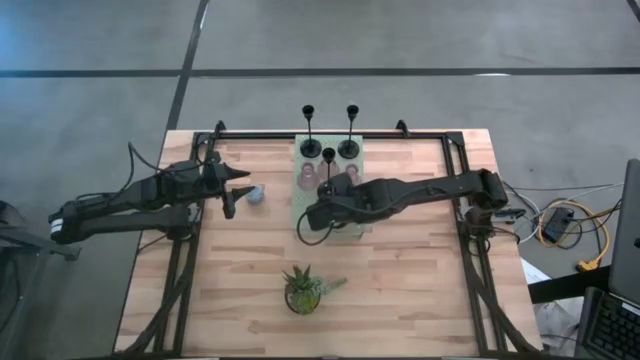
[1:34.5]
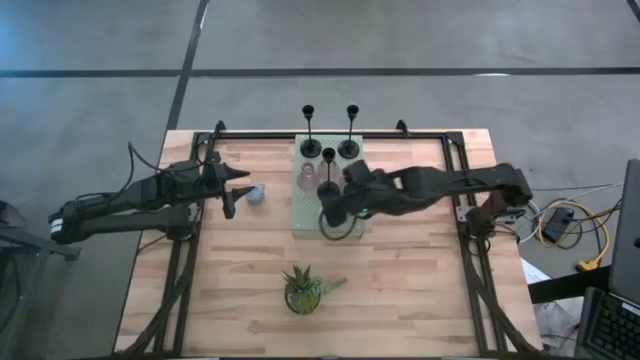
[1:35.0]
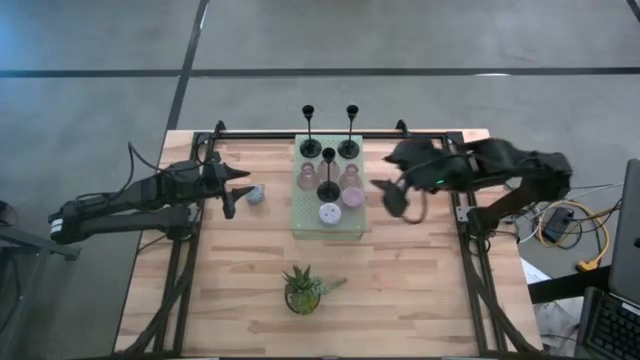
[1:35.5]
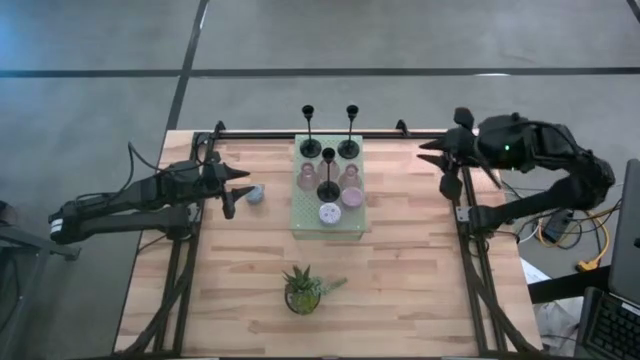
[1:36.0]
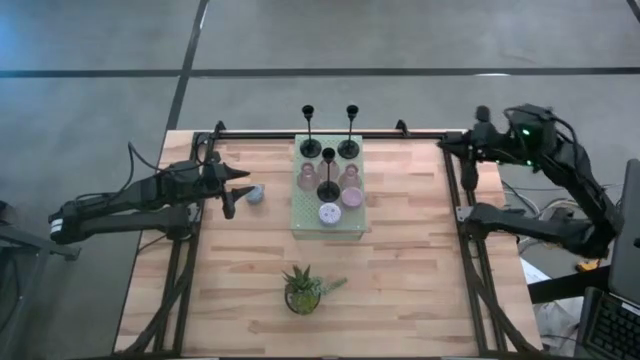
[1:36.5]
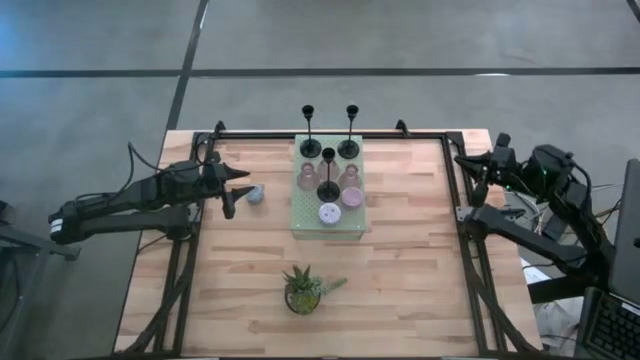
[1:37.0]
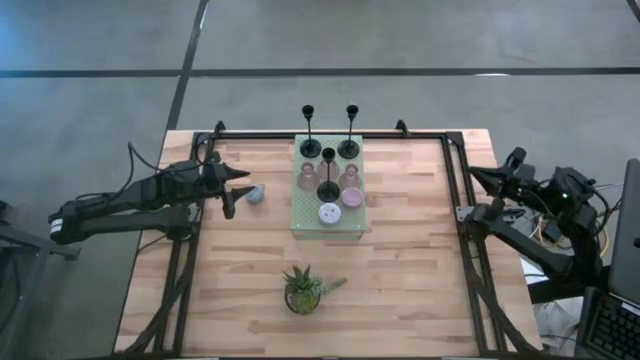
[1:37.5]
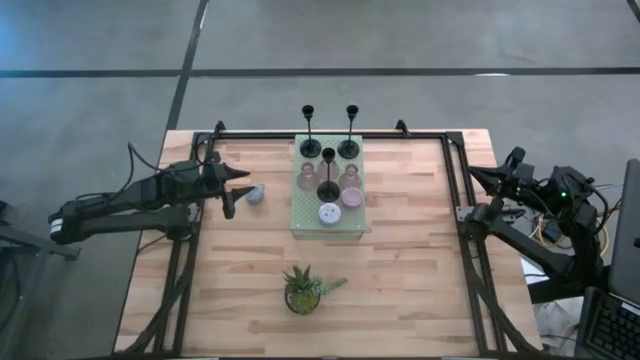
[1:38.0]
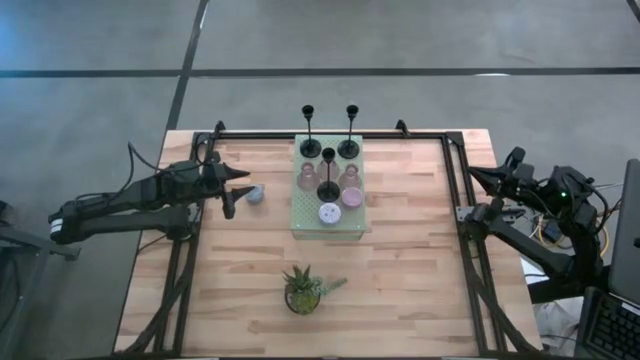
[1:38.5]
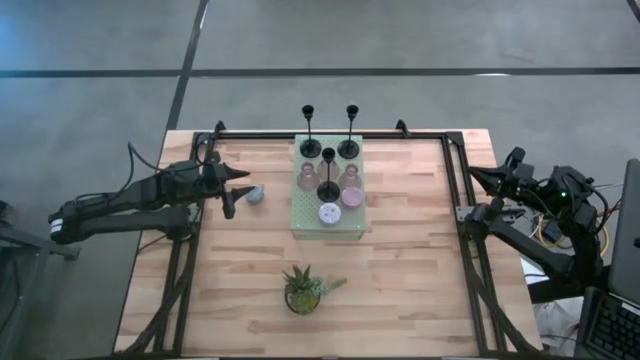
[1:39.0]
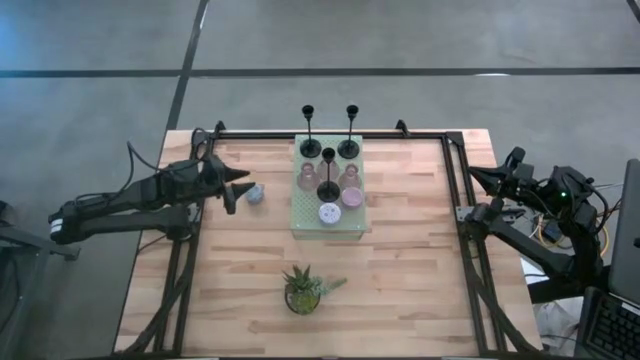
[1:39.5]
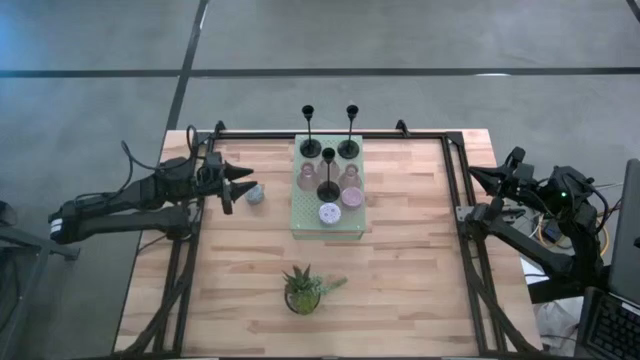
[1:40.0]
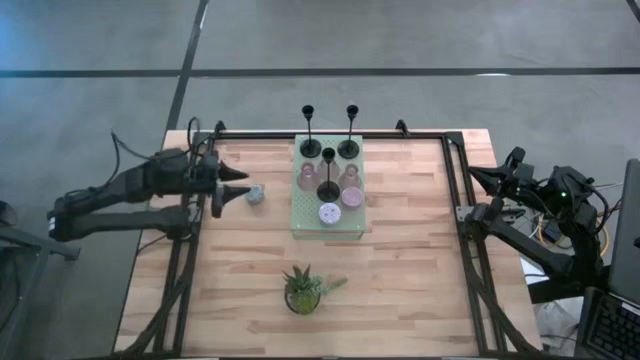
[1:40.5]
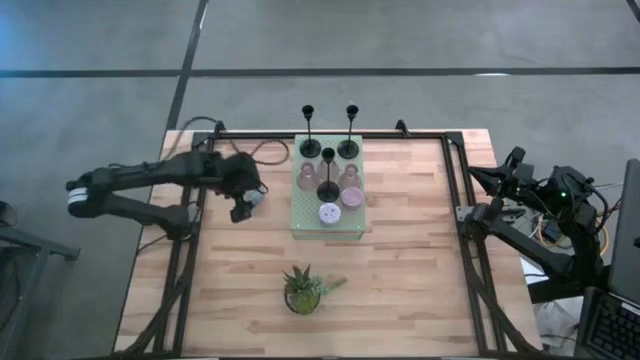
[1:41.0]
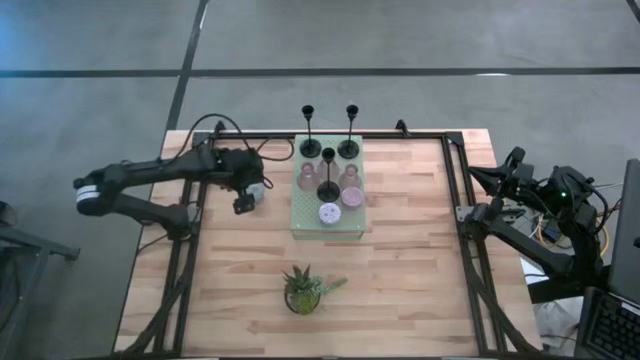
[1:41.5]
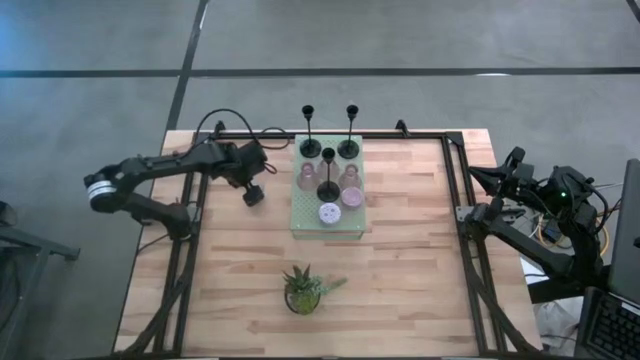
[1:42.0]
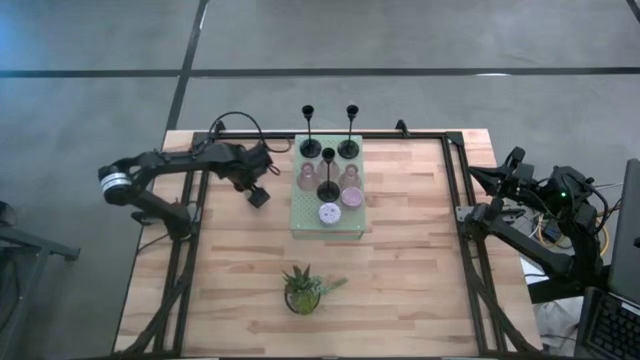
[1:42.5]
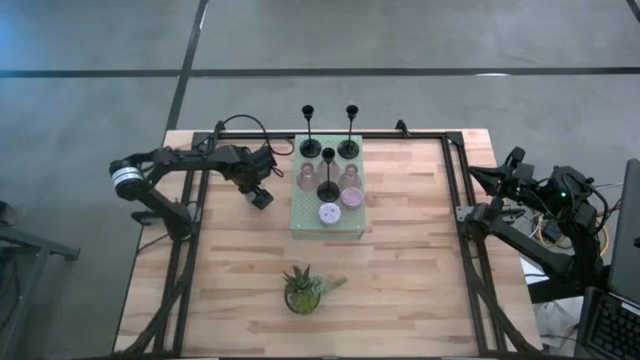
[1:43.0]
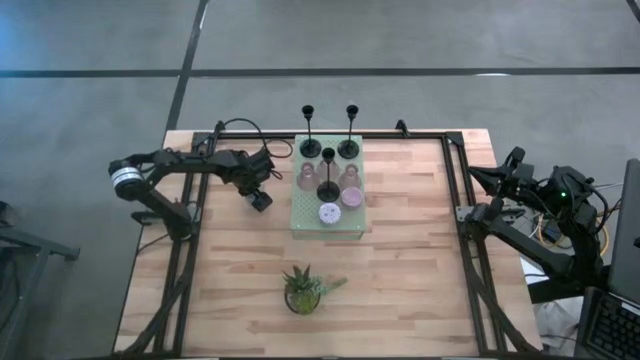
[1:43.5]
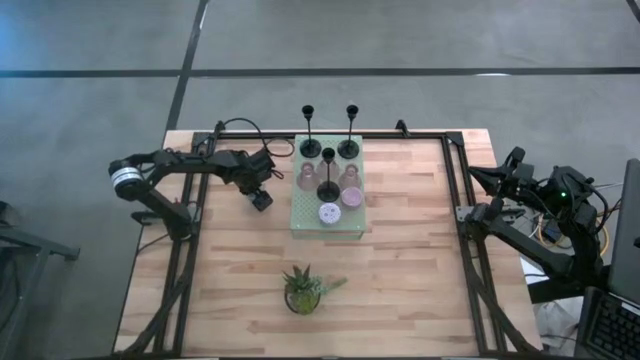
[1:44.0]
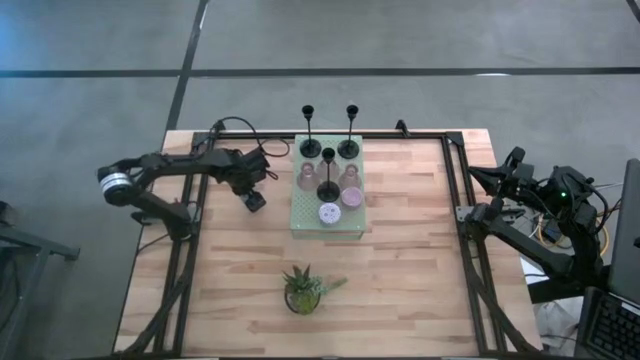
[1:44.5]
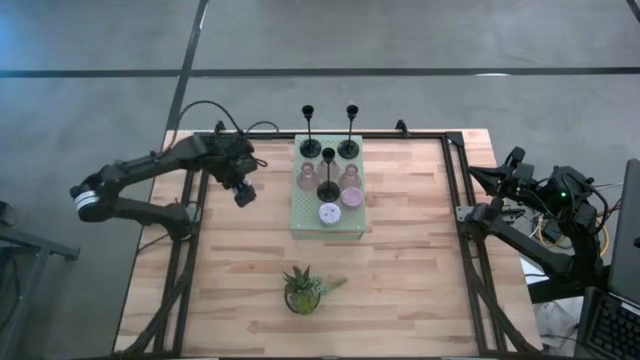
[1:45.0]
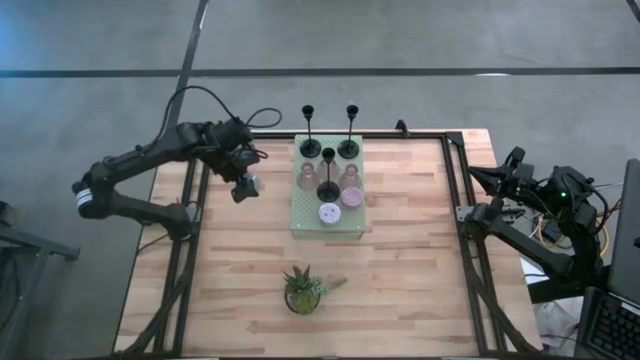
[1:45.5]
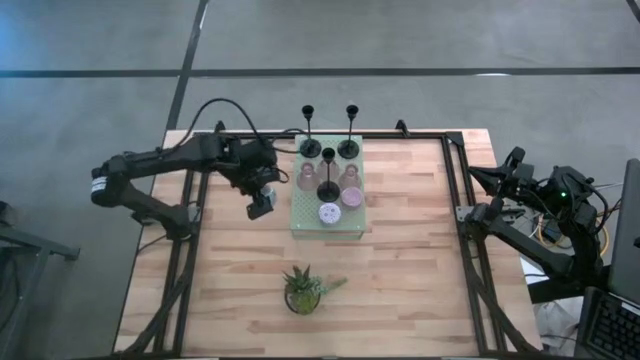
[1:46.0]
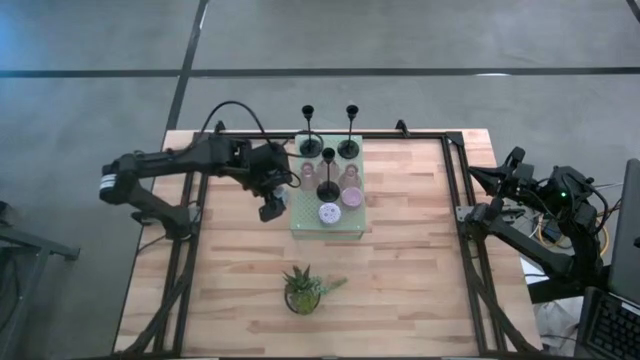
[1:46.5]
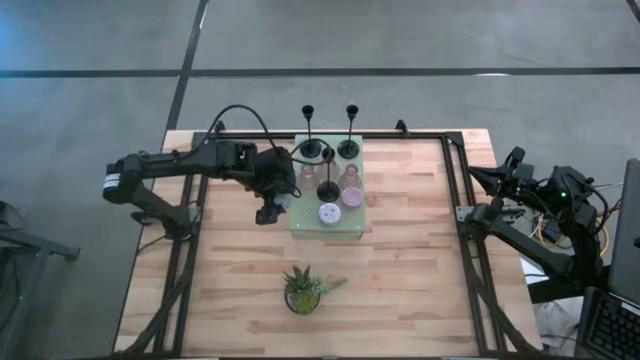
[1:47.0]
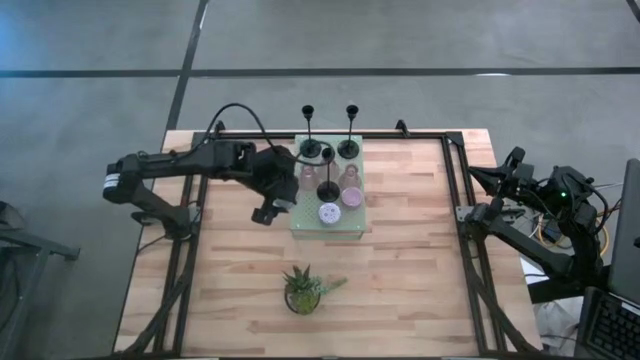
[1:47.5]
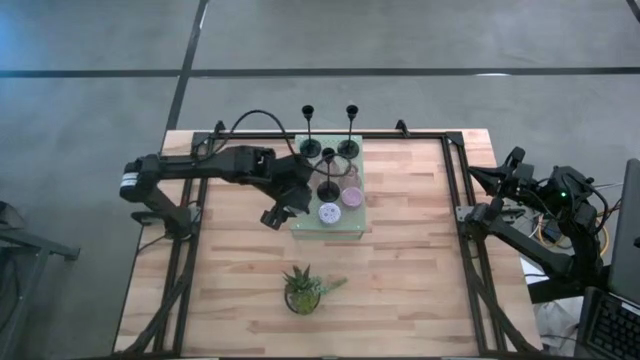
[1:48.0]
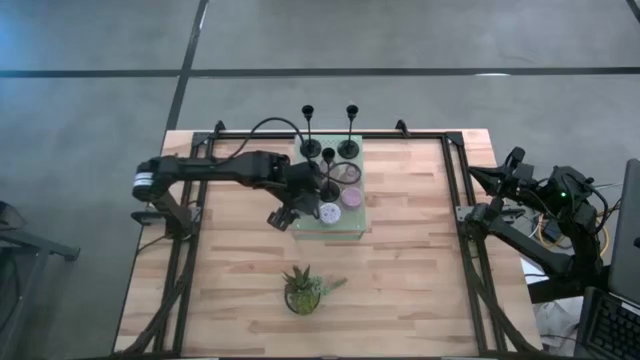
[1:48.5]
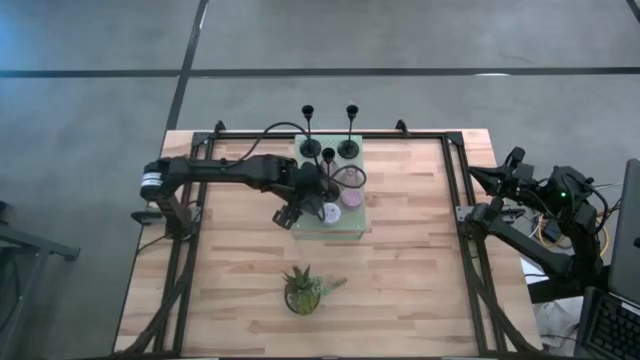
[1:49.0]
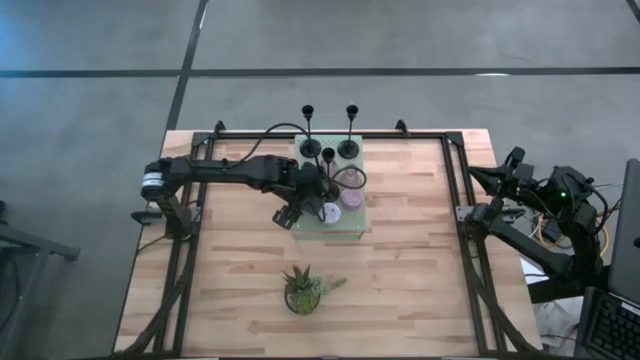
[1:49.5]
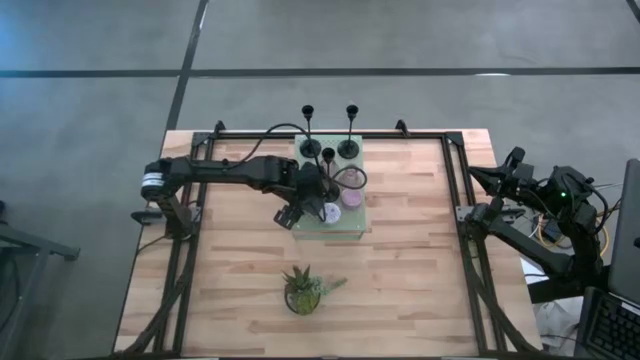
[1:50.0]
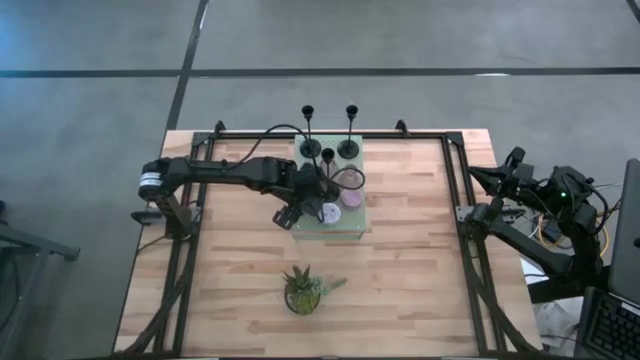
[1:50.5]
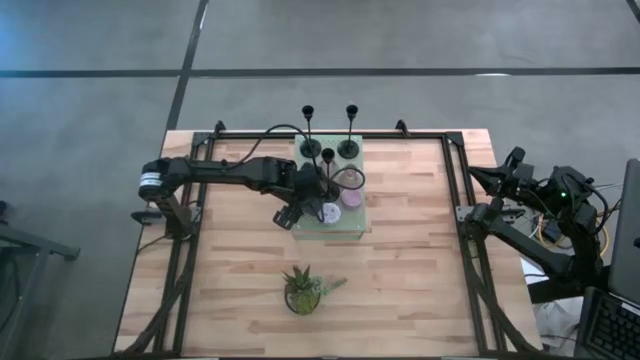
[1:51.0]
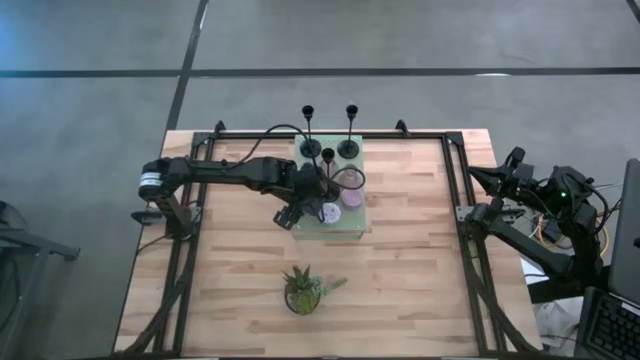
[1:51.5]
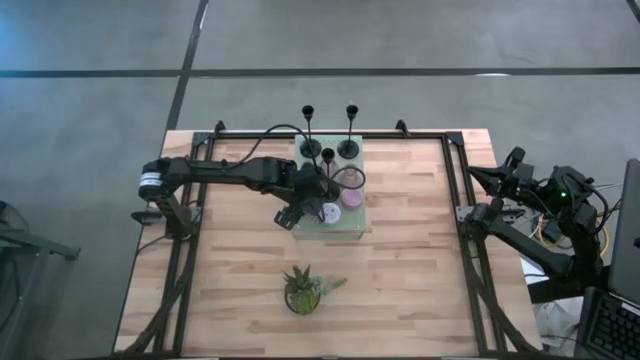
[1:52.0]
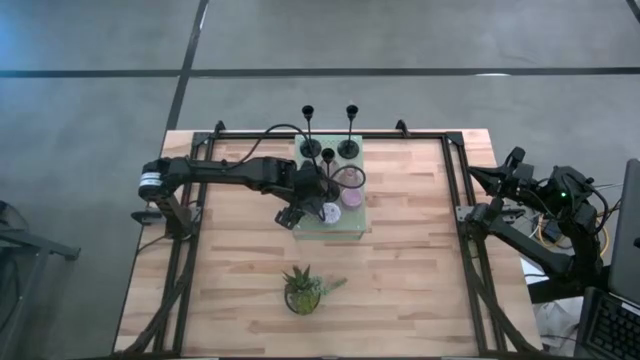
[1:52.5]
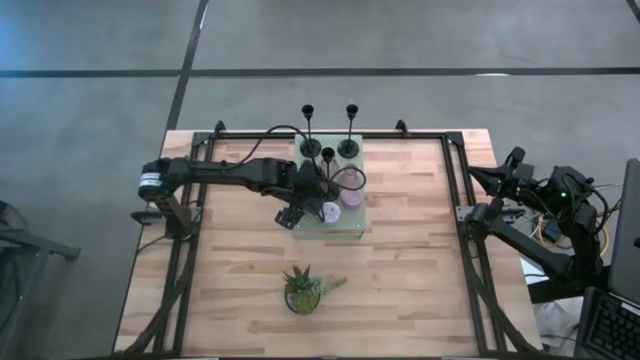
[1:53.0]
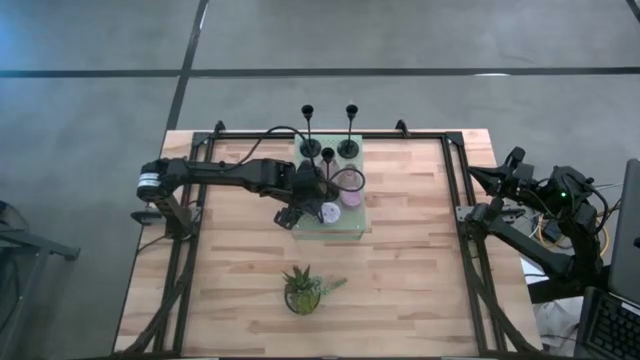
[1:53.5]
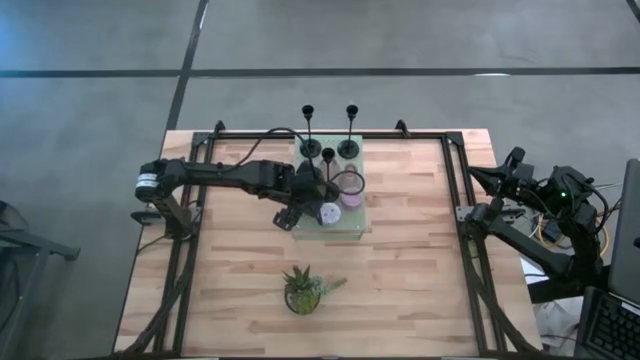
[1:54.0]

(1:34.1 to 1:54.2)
Task: Pick & Place candle stick holders
Put the blue scented candle on the shelf

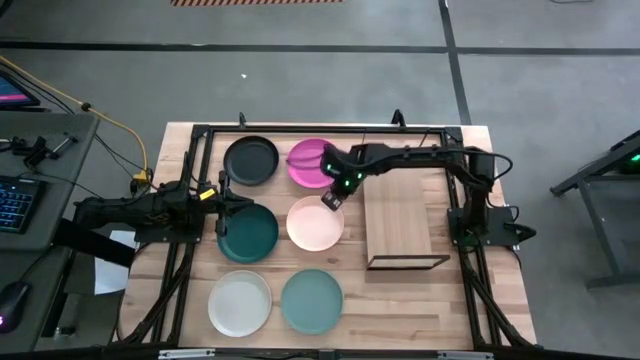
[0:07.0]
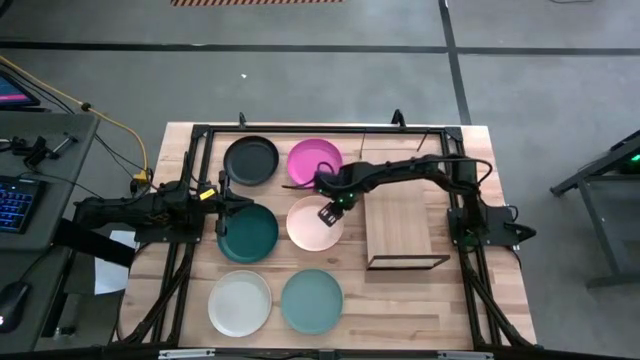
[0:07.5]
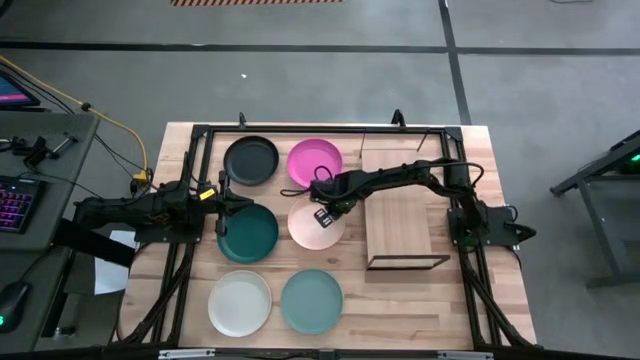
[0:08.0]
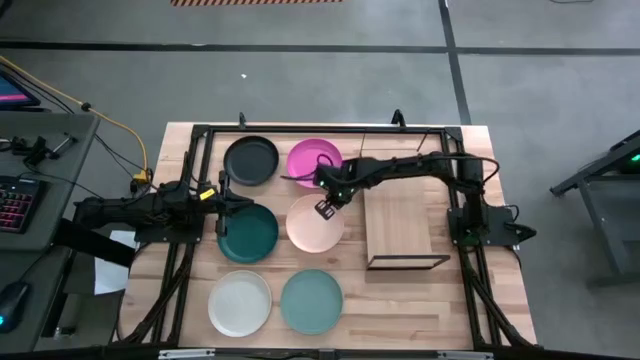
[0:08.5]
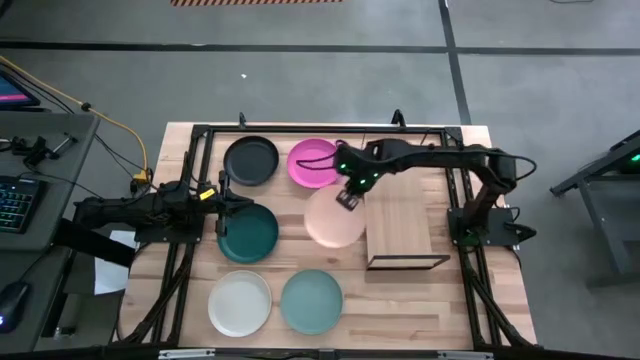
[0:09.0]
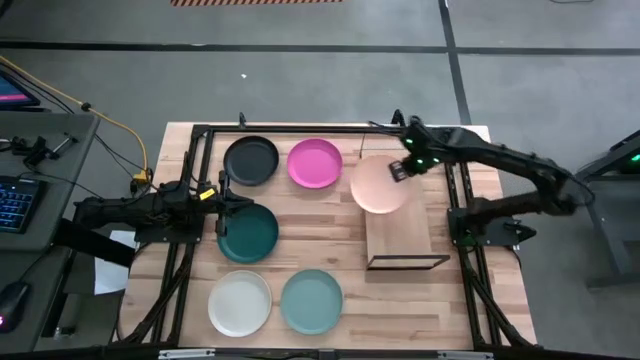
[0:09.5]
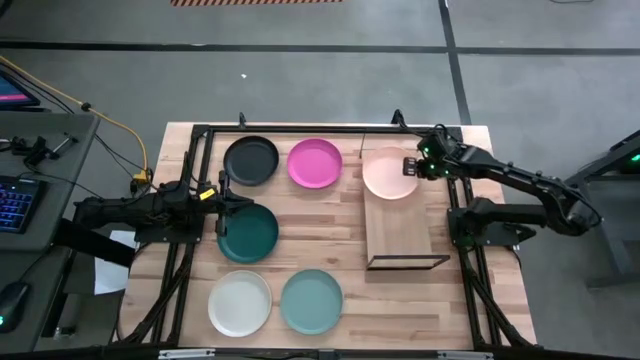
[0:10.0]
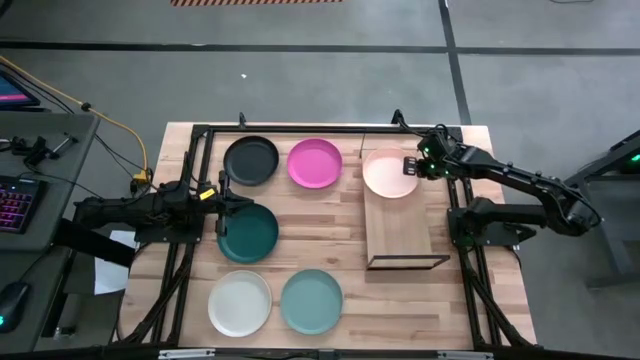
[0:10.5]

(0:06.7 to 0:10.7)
Task: Place and stack plates onto a shelf
Put the light red plate on the shelf
